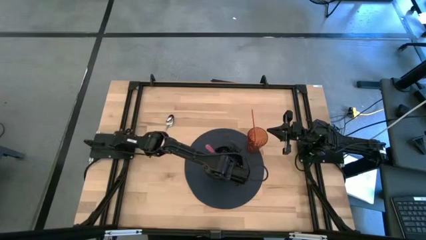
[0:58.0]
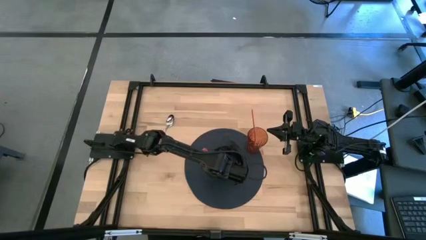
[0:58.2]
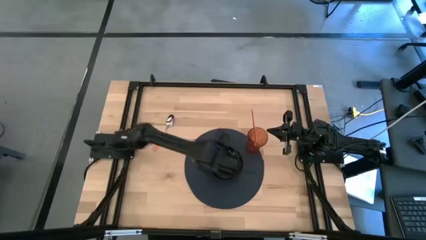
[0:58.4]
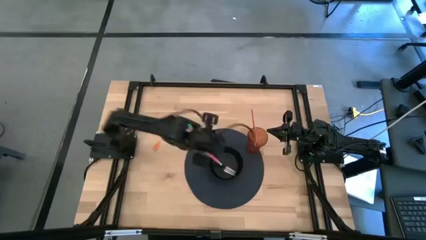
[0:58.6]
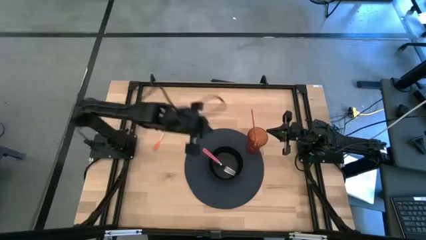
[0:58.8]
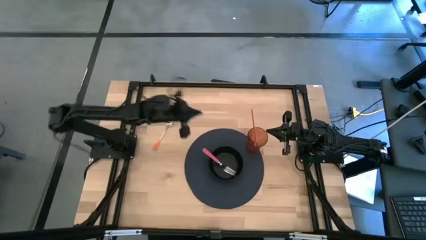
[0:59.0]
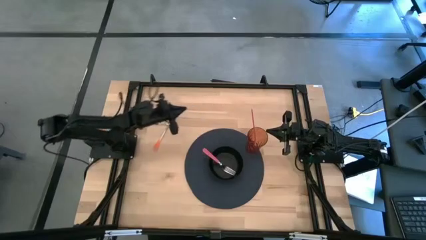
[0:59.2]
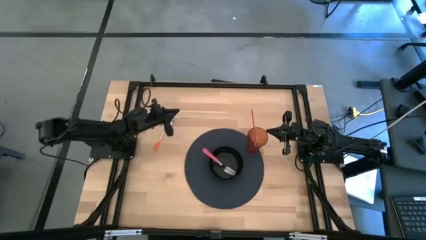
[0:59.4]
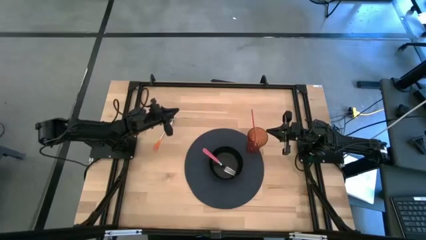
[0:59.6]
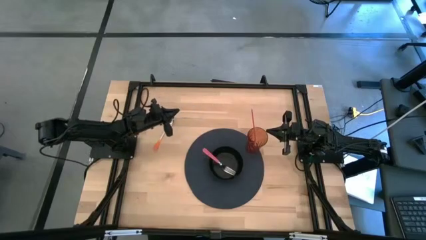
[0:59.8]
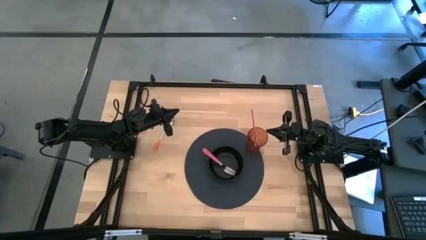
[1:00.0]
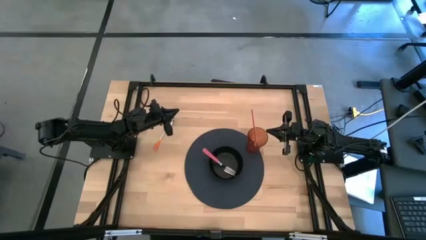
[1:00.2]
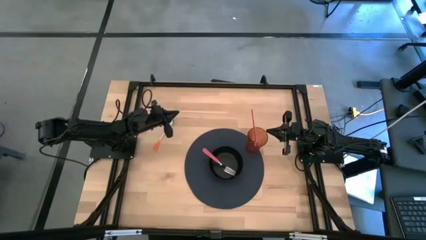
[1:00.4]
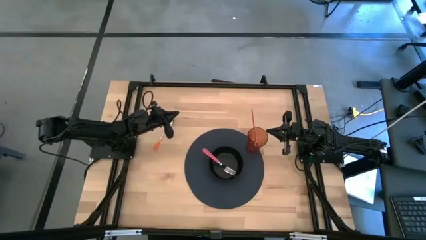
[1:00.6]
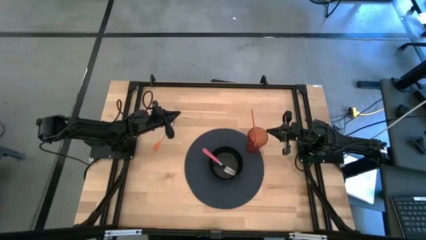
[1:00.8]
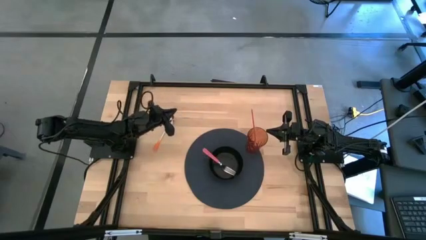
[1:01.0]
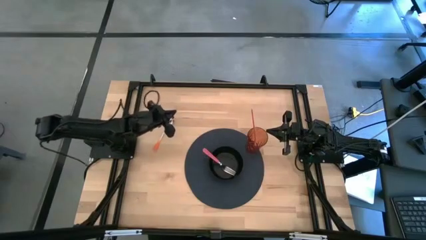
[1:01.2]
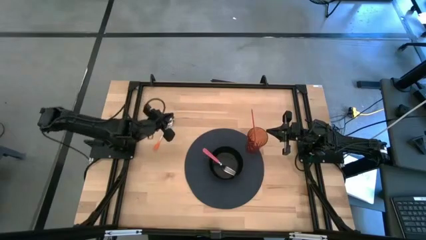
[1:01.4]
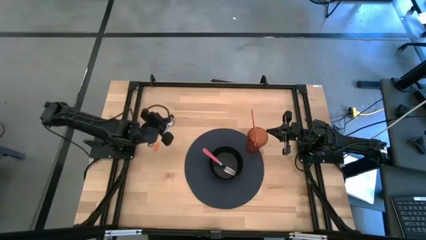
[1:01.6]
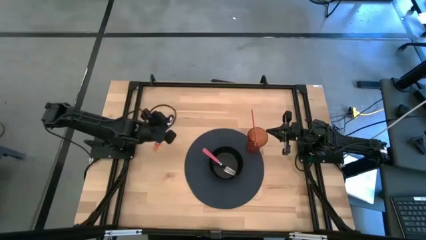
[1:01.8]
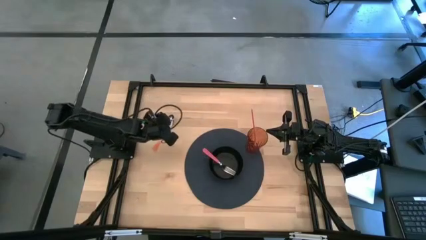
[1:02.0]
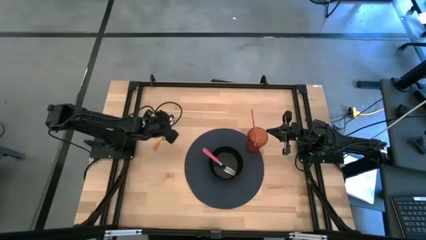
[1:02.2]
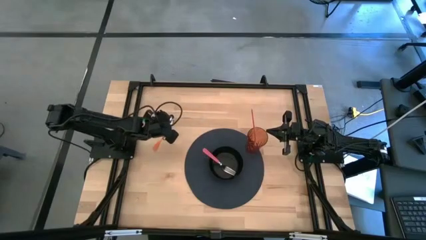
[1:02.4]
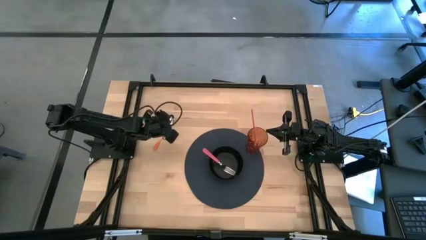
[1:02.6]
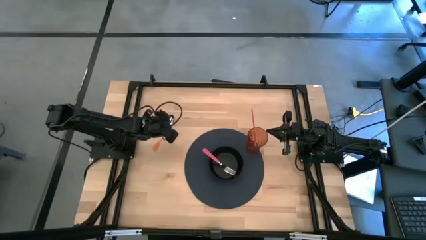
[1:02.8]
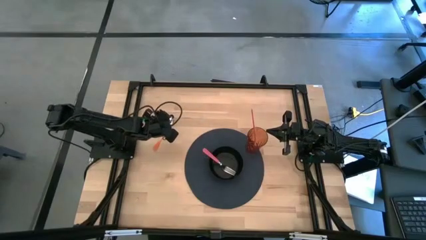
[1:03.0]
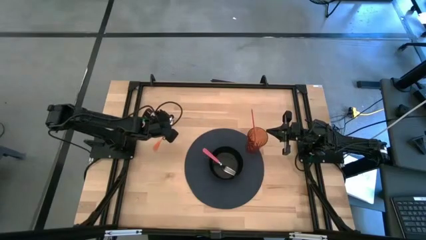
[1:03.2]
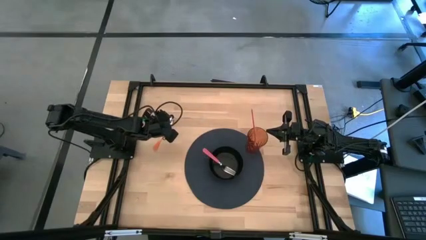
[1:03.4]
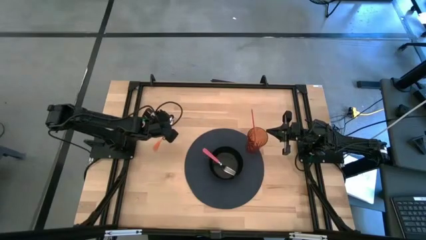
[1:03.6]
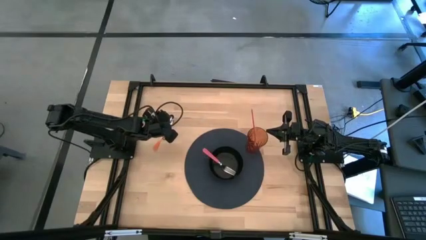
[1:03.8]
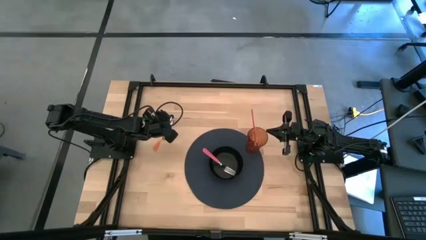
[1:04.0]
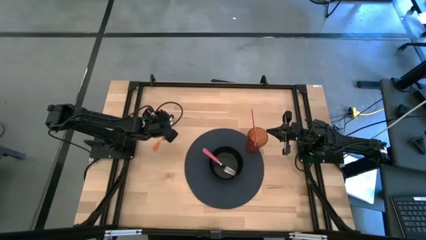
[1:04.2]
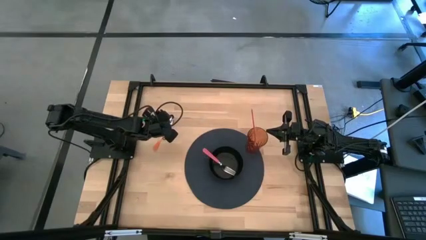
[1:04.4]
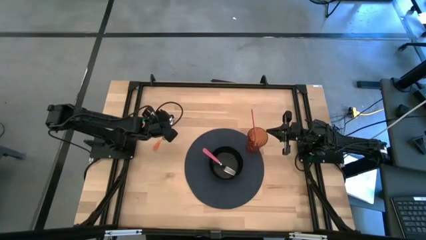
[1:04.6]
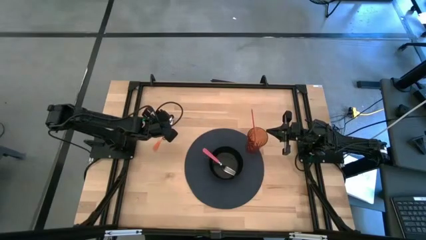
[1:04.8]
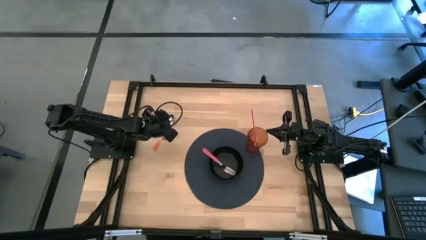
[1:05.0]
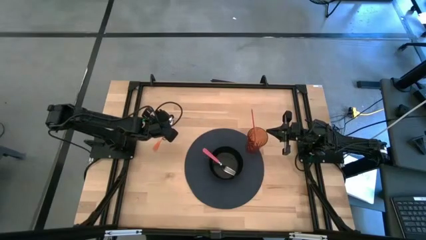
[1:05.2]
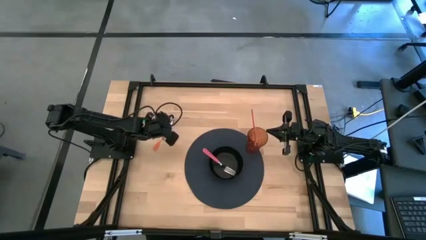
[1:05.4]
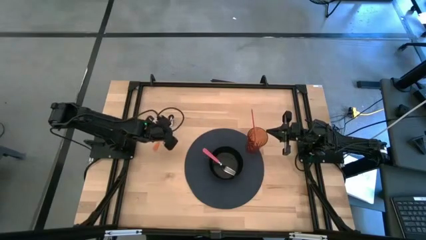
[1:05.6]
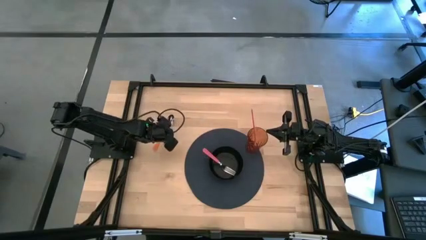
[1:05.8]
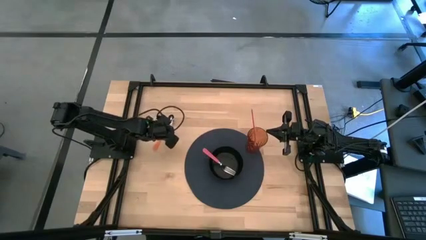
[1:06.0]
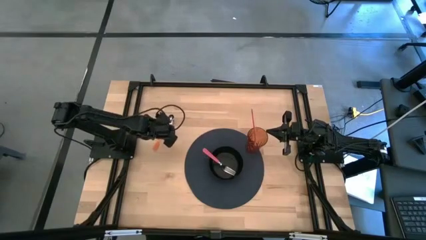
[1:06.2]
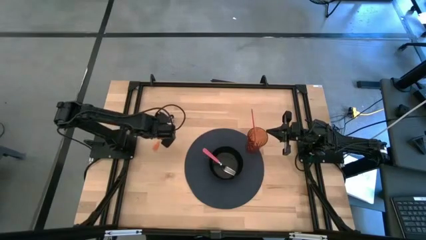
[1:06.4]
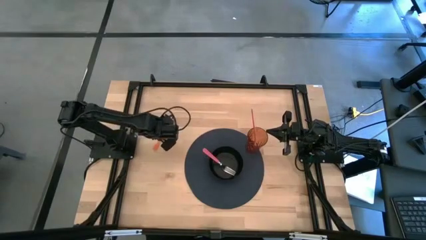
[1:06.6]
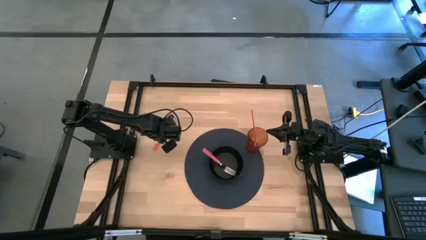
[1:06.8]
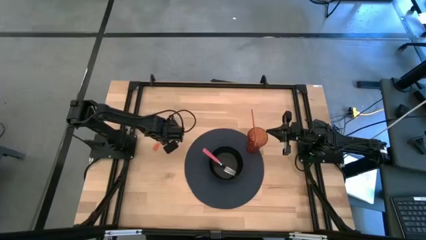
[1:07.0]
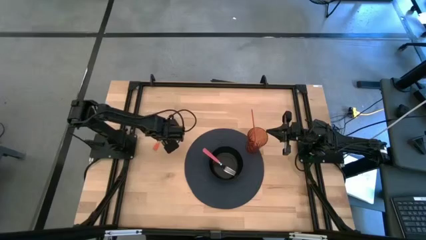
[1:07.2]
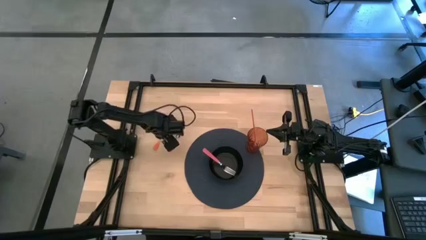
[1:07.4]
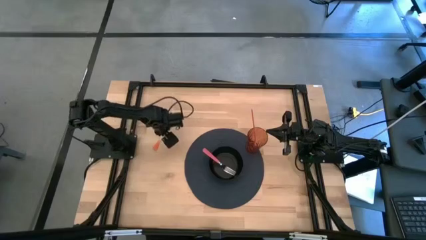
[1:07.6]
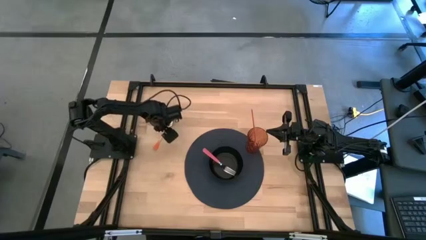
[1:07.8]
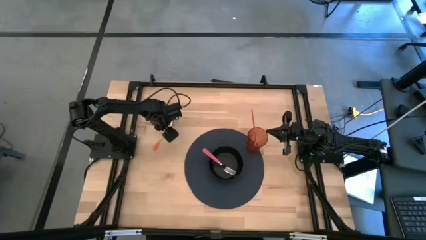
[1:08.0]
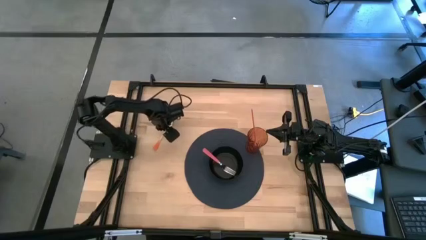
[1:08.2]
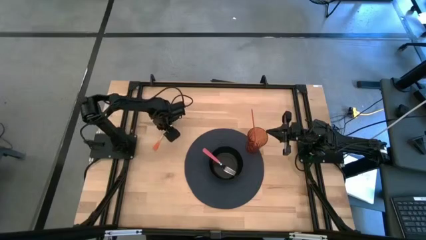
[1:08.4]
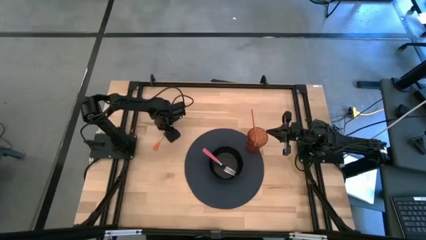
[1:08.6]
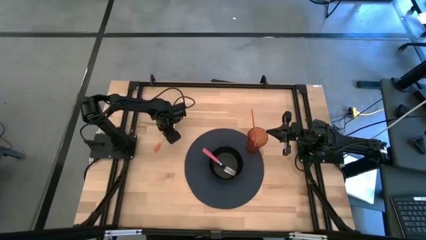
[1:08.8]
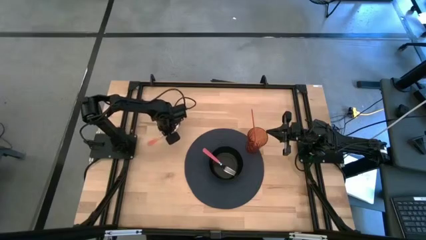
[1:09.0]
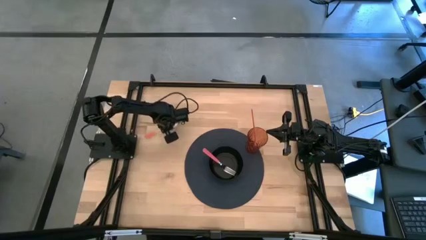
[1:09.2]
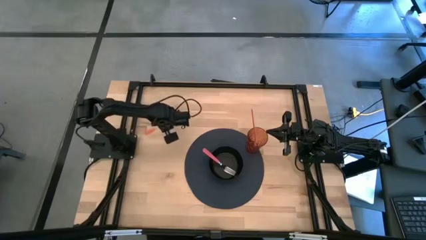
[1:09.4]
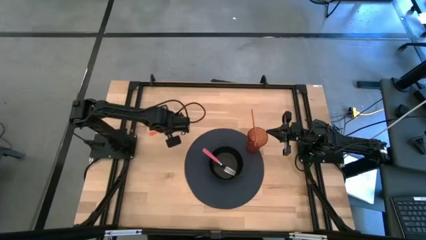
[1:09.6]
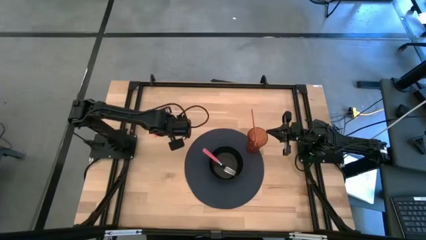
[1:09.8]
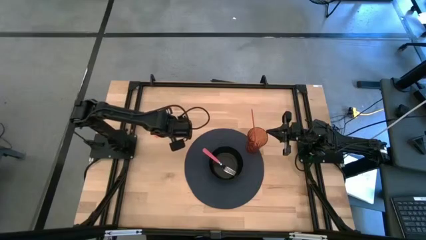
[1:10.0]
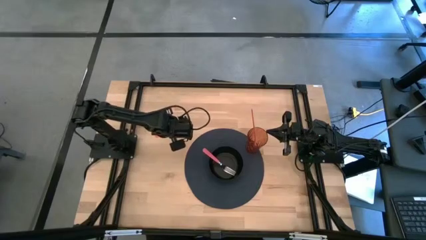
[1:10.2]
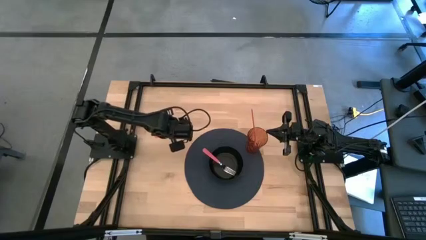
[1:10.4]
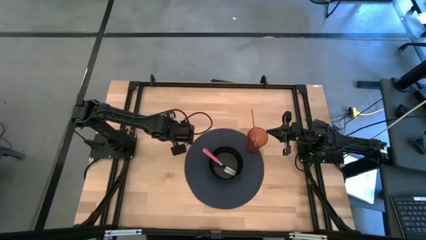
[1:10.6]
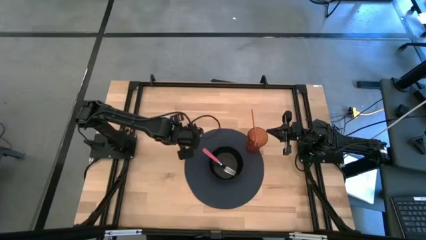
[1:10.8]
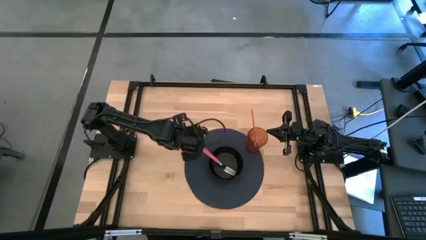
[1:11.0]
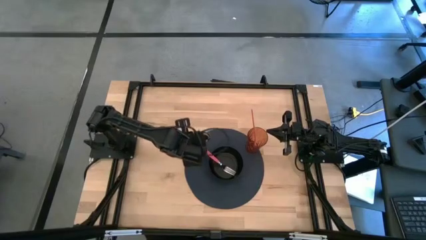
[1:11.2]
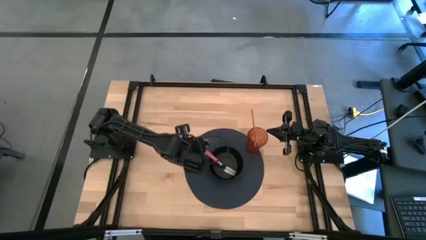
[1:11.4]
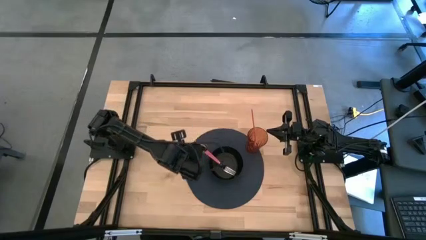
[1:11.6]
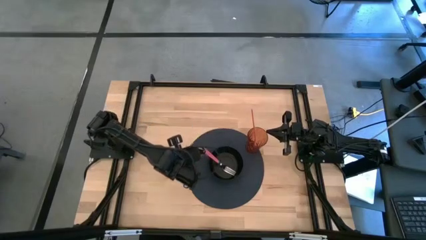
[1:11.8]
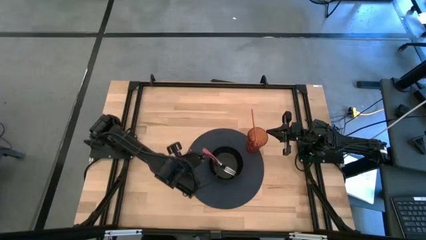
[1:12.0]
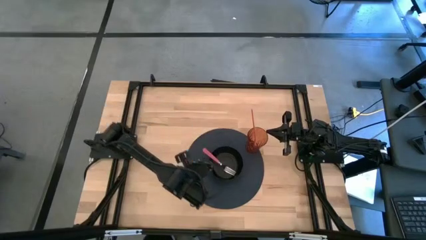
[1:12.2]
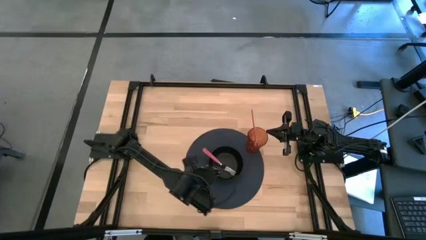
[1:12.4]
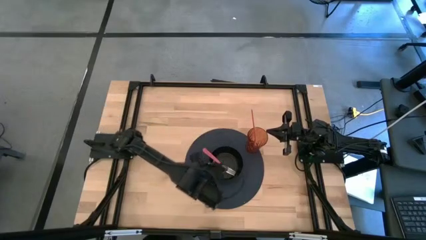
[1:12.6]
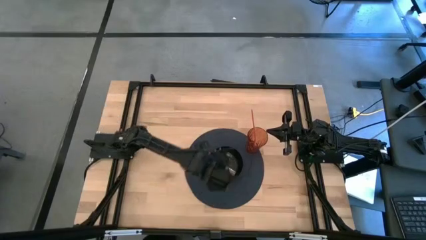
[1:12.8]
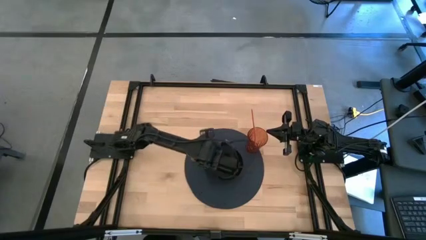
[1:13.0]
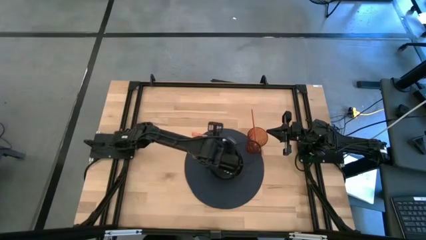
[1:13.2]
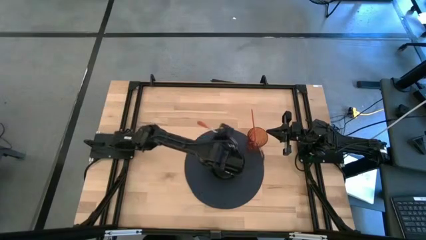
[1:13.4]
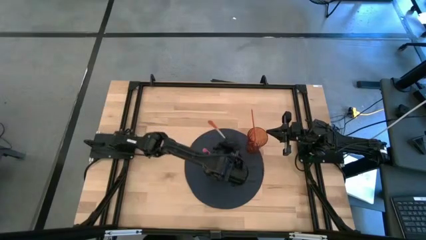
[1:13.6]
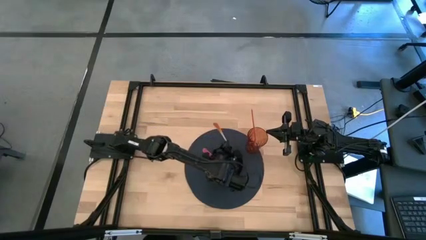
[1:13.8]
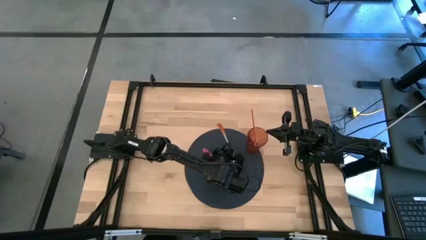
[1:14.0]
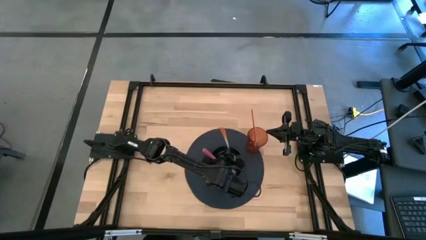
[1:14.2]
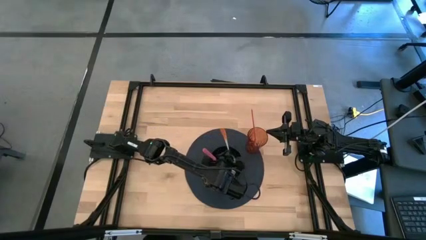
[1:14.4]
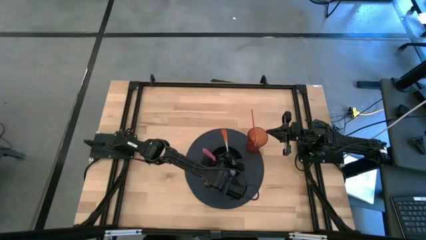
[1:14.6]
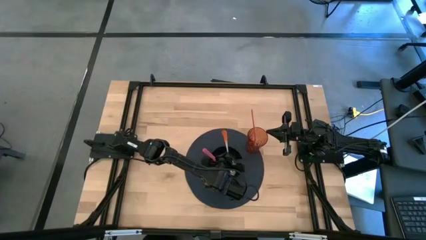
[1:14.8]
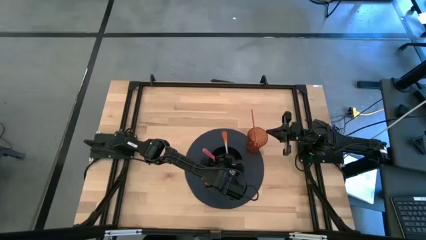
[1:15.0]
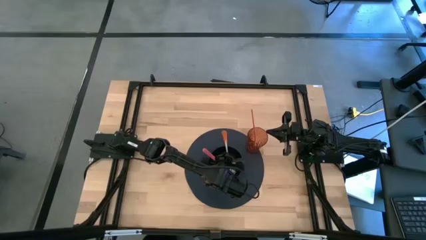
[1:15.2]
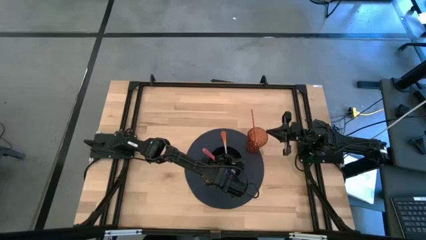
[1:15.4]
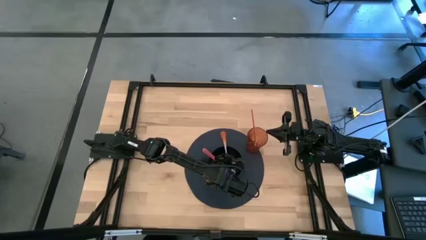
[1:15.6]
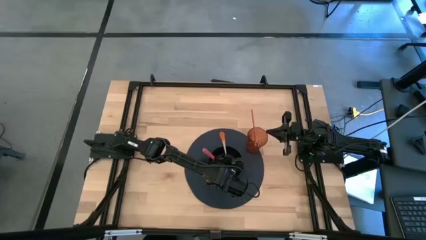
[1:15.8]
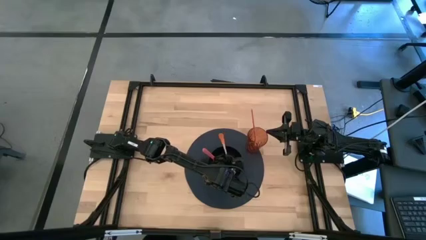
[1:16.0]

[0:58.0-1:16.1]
Task: Pick & Place Utensil
Put the orange spoon into the black bowl on the blue mat
